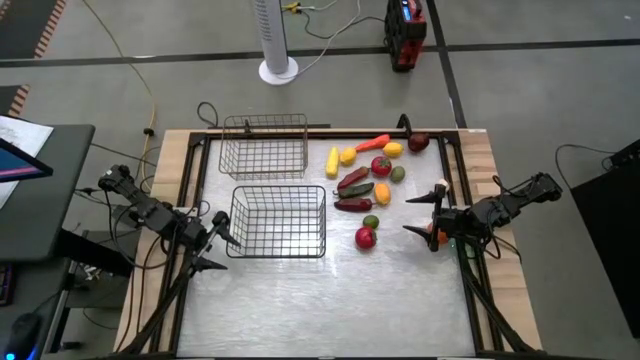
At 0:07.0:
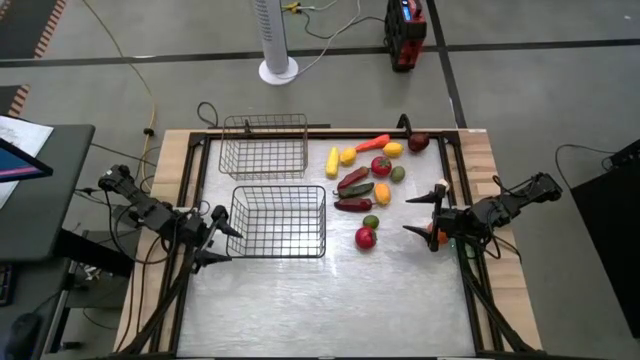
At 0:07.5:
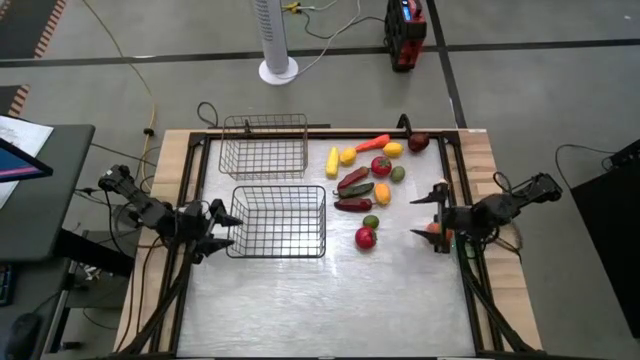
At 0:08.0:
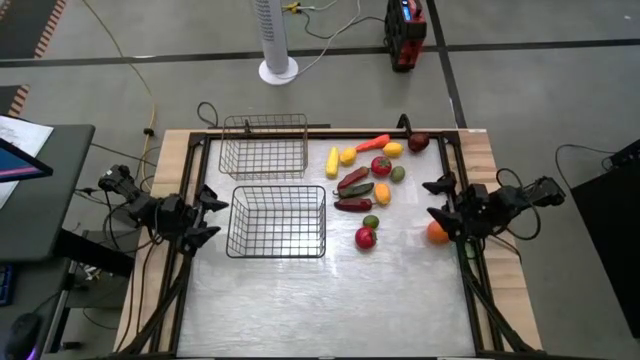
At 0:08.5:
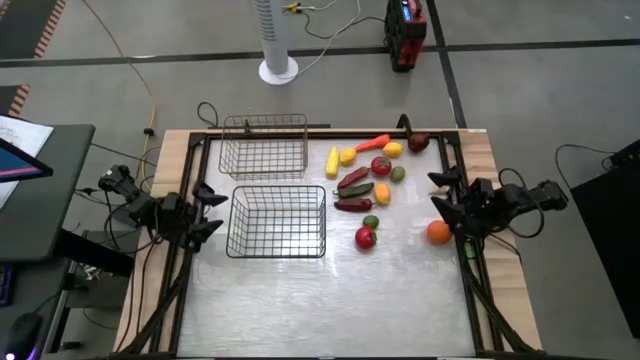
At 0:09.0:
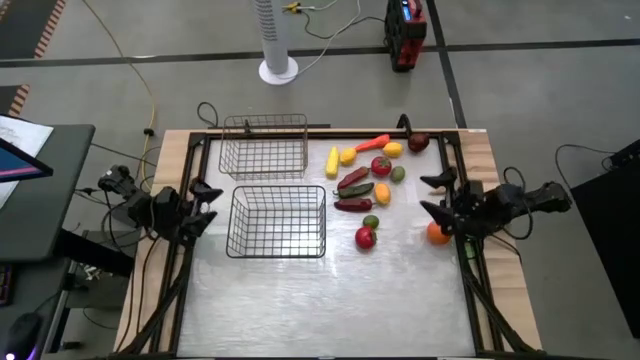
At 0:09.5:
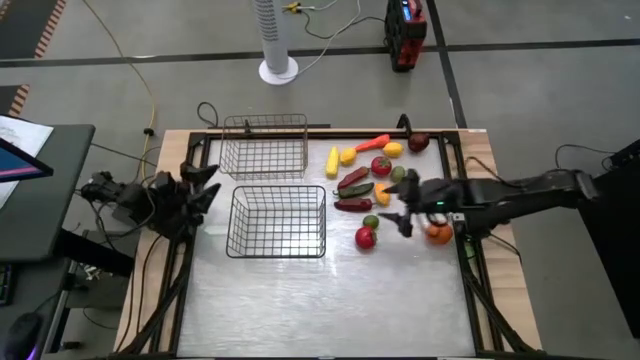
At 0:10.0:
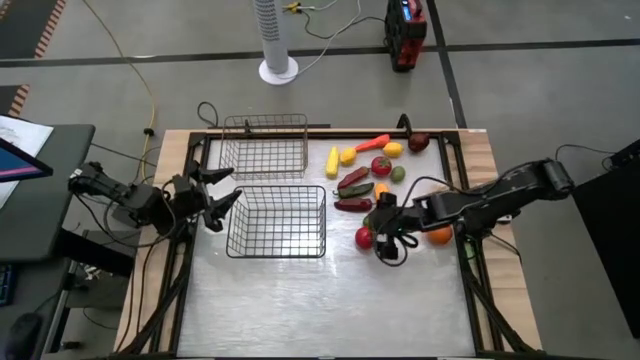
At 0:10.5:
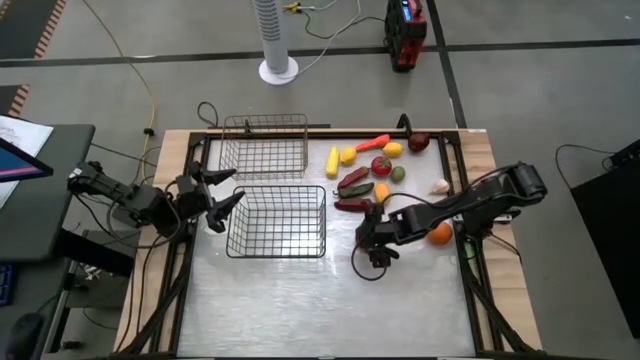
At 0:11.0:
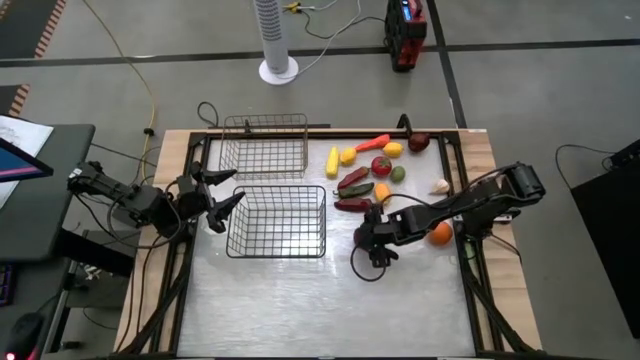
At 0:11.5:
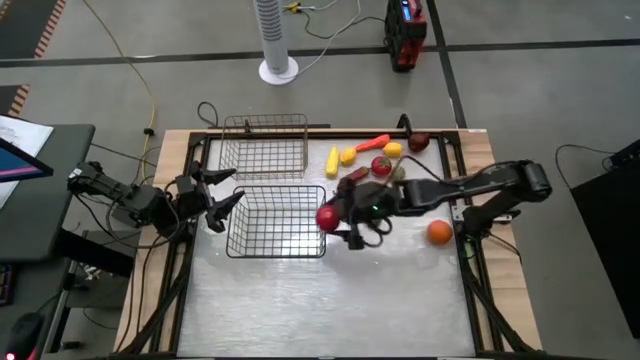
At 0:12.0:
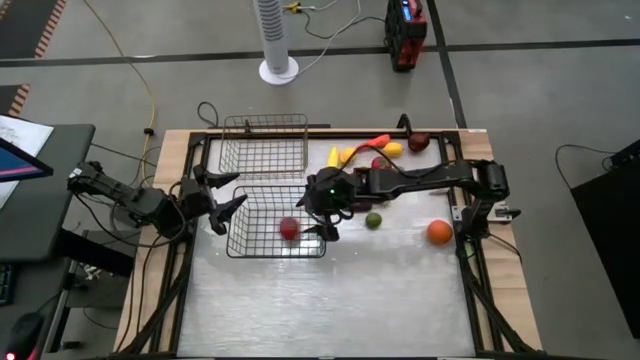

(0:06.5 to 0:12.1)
Task: Sort produce into baskets
Put the bottom red tomato into the bottom wire basket

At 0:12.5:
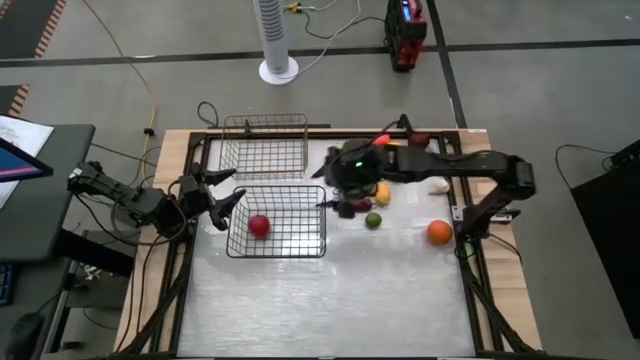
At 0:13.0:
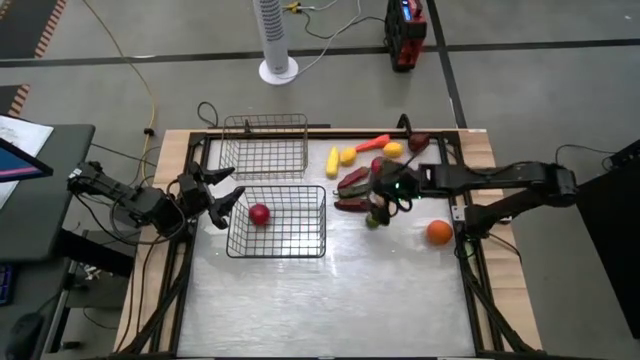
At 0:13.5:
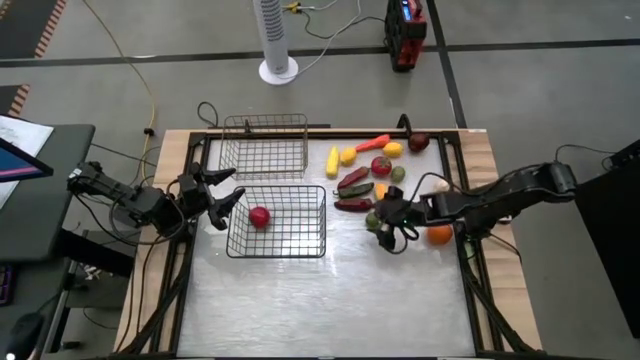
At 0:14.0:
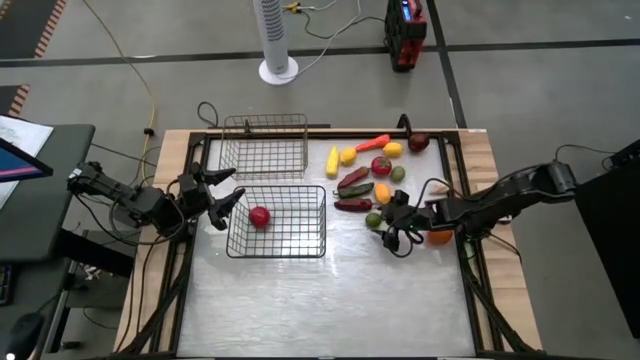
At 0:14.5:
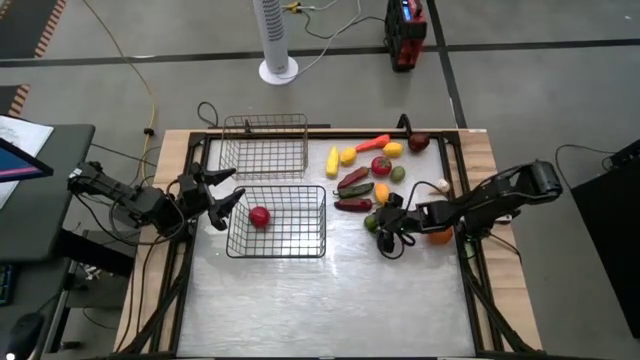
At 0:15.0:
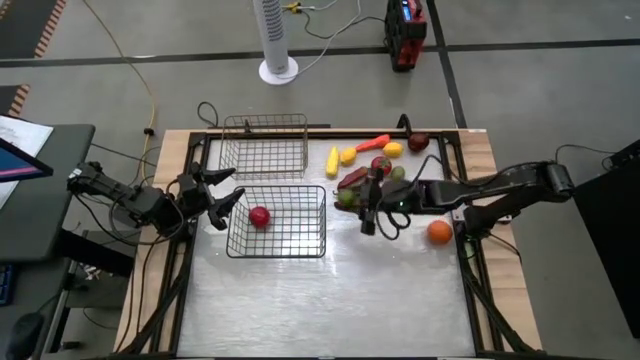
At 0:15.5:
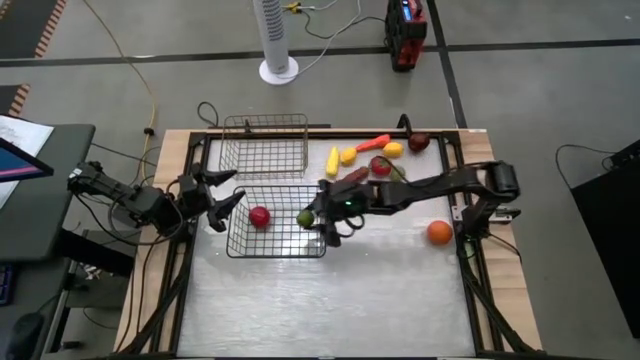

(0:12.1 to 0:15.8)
Put the bottom green lime into the bottom wire basket

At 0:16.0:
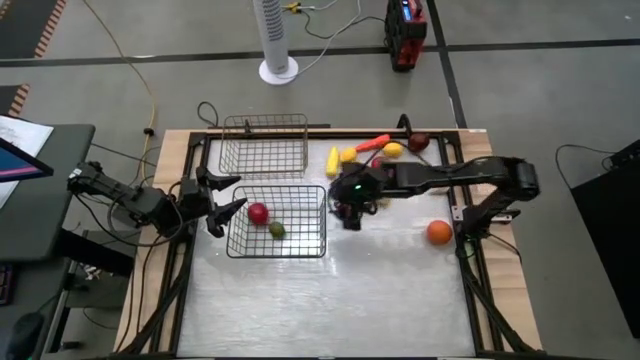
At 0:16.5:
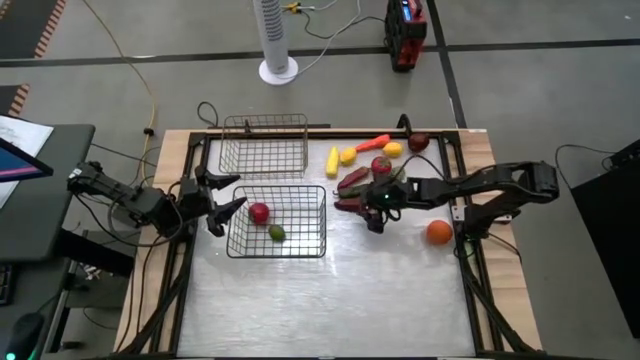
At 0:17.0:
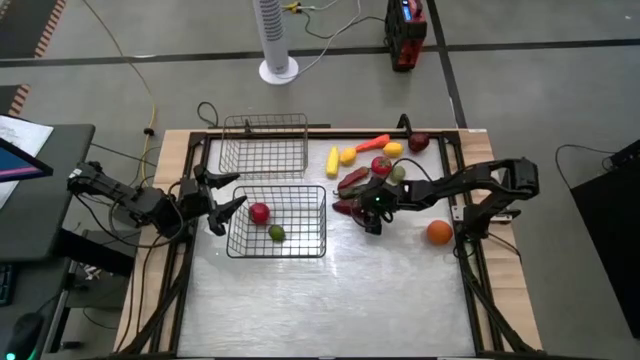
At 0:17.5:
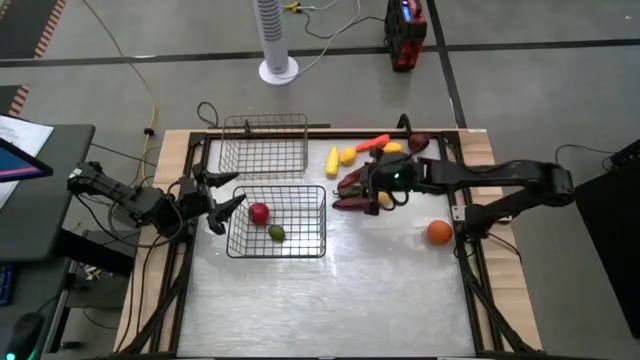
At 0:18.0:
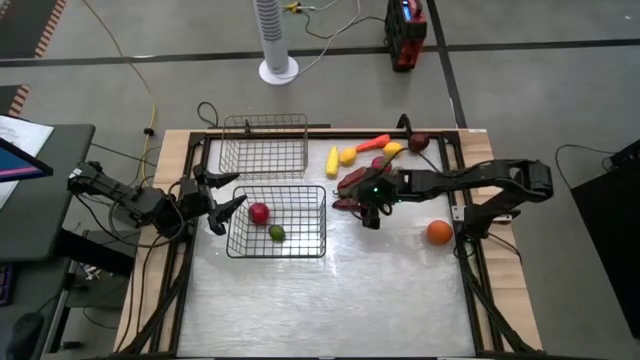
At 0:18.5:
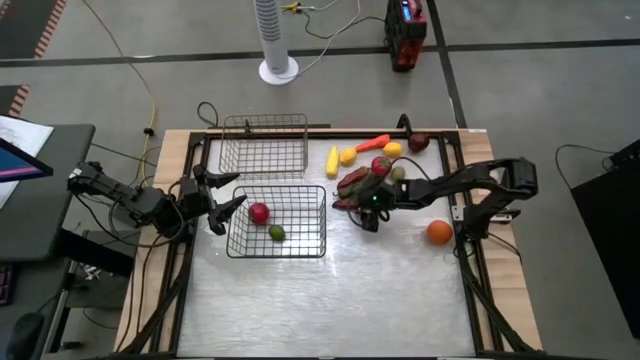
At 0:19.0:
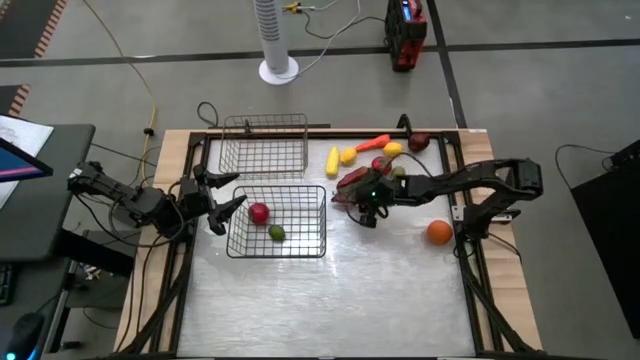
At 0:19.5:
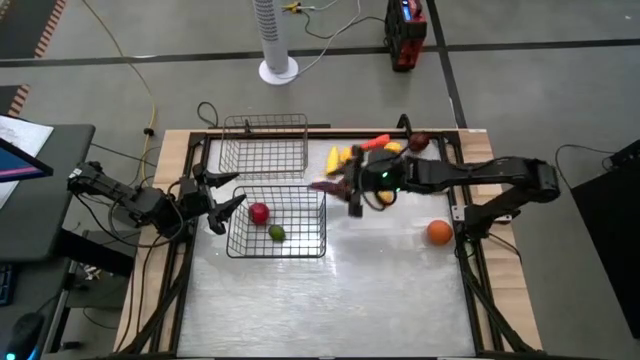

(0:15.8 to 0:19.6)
Put the bottom red chili pepper into the bottom wire basket

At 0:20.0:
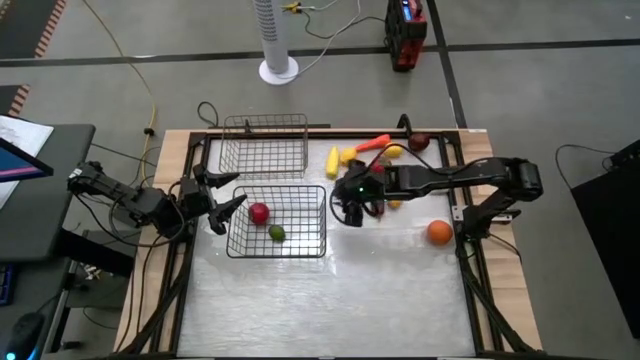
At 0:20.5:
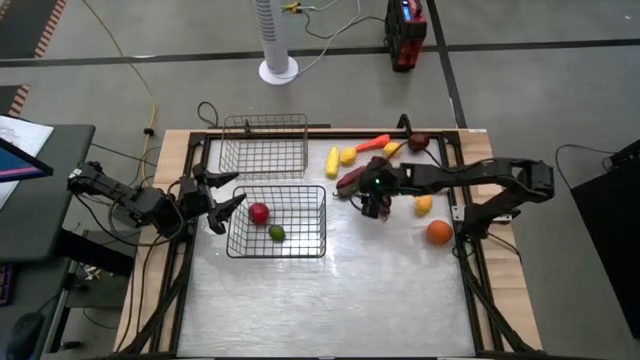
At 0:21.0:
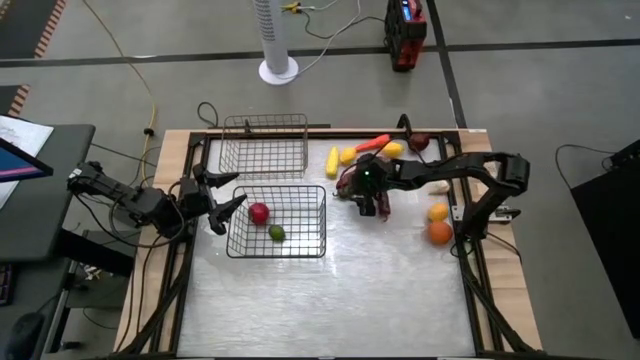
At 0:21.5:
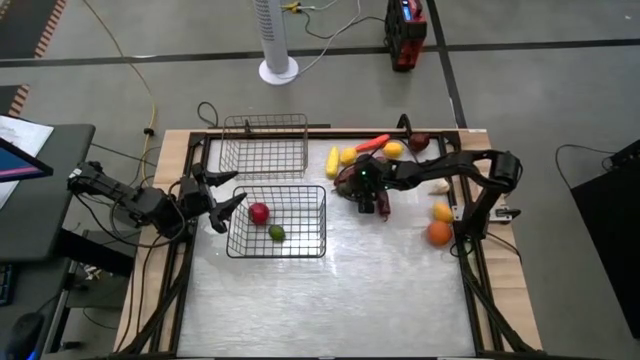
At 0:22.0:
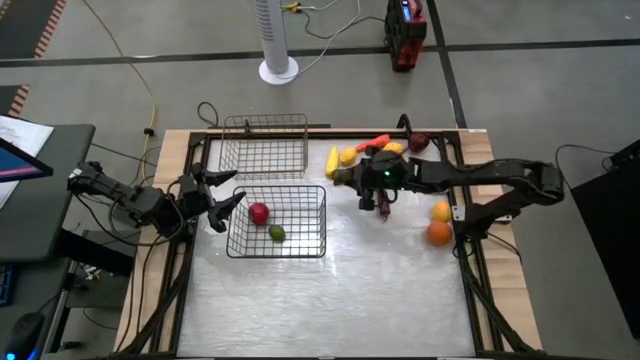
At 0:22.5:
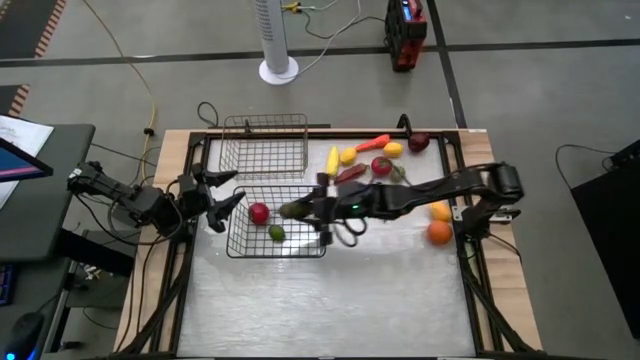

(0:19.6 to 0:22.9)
Put the green chili pepper into the bottom wire basket

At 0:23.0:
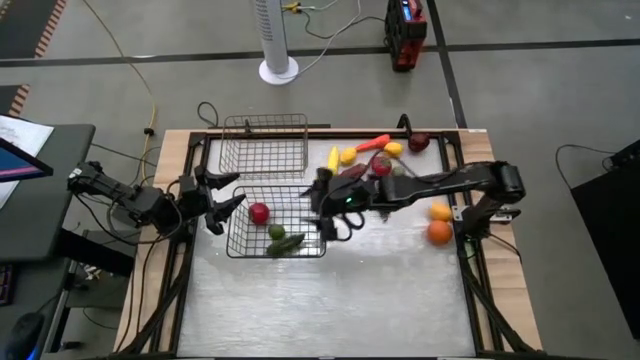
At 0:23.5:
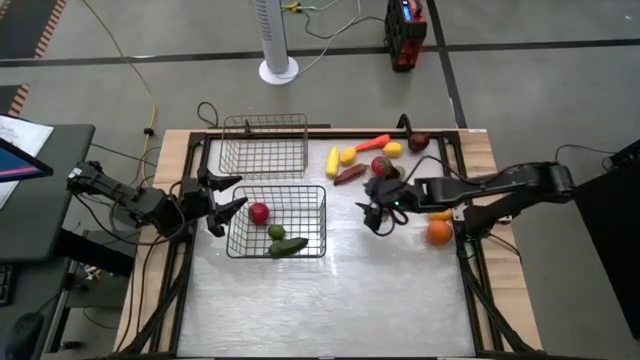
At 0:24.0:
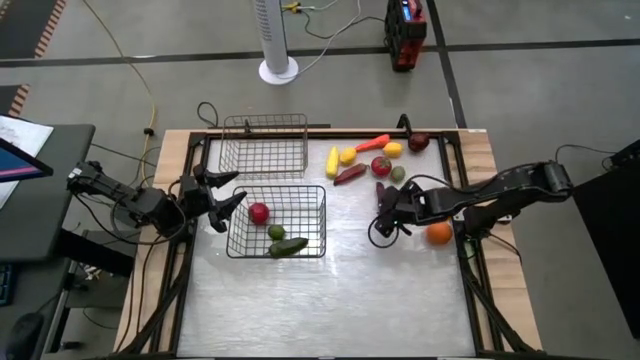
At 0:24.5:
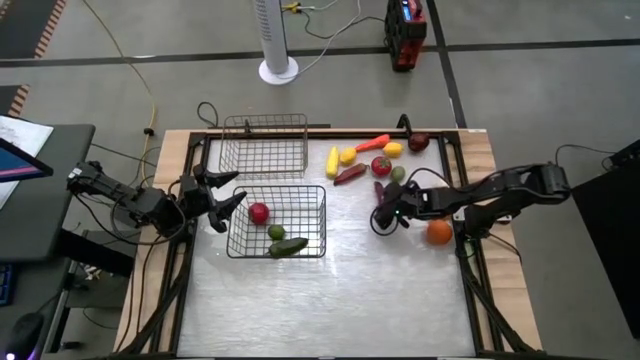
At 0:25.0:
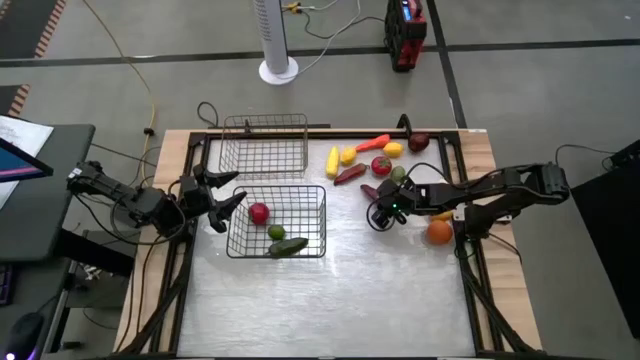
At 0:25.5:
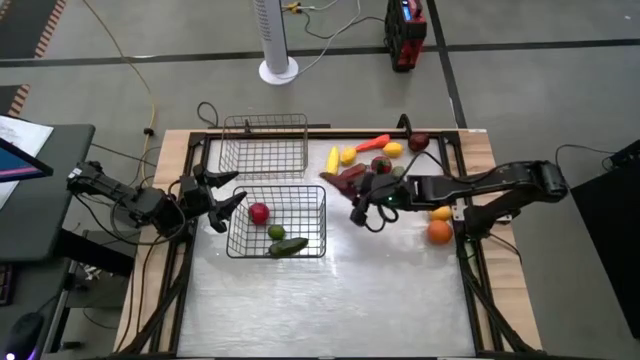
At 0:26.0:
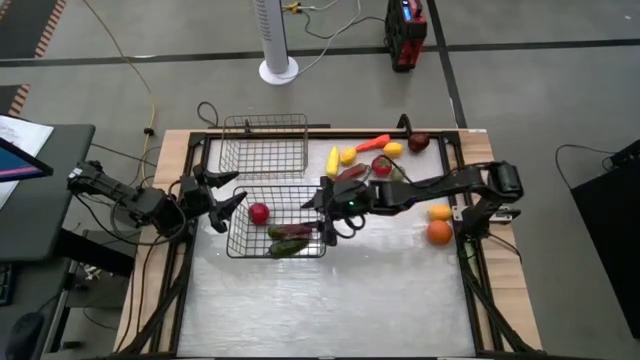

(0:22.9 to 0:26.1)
Put the bottom red chili pepper into the bottom wire basket

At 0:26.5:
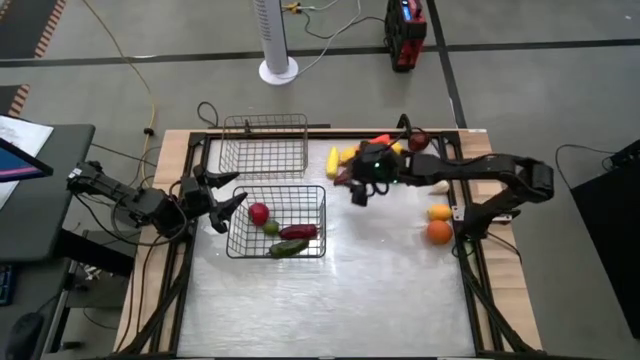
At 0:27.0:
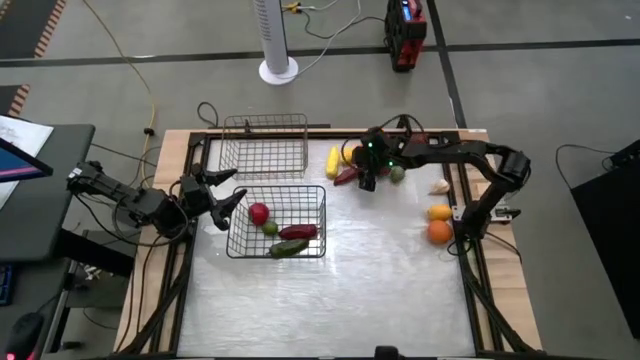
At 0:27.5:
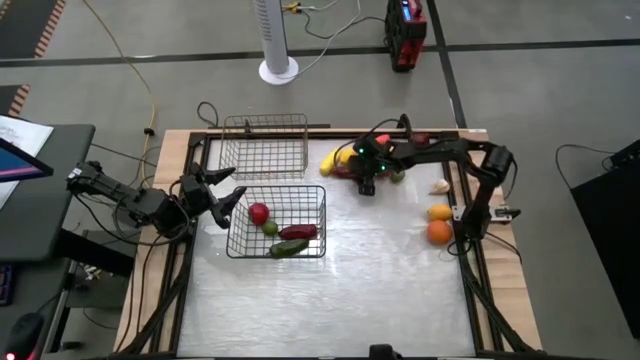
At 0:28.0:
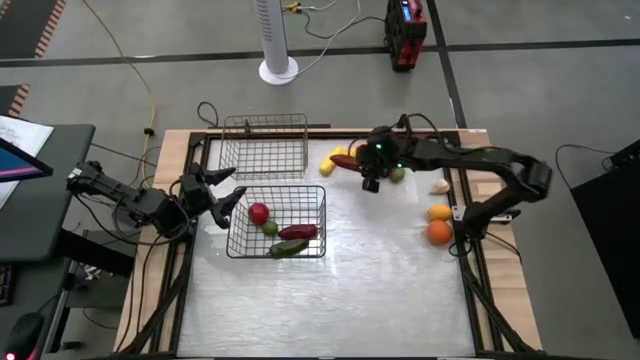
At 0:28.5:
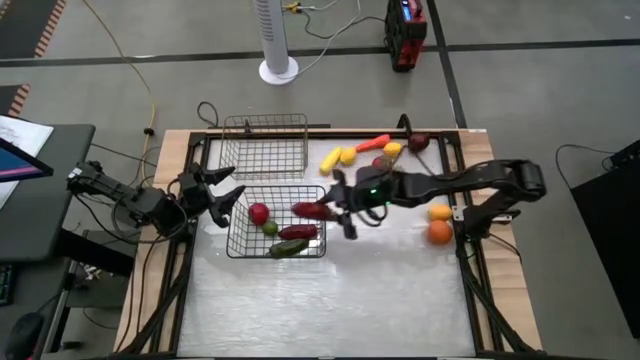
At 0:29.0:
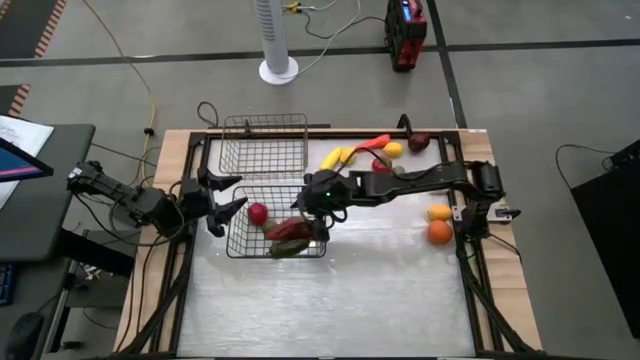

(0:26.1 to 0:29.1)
Put the red chili pepper into the bottom wire basket
